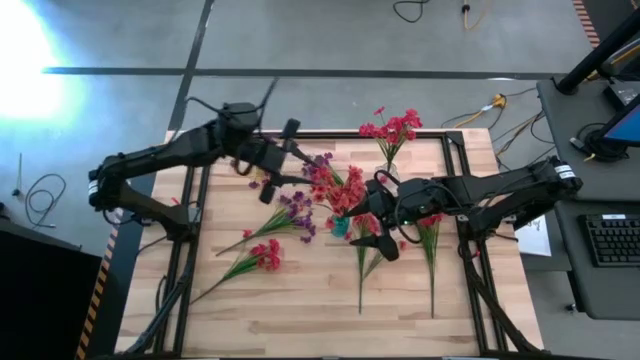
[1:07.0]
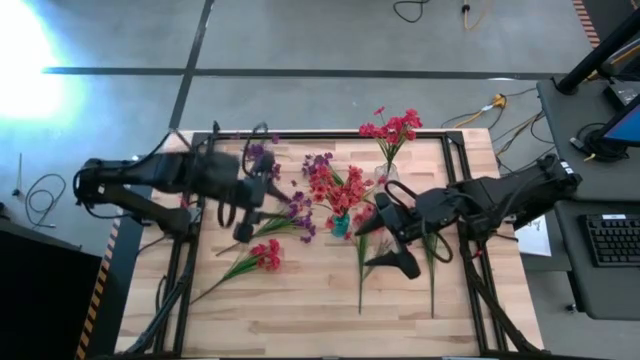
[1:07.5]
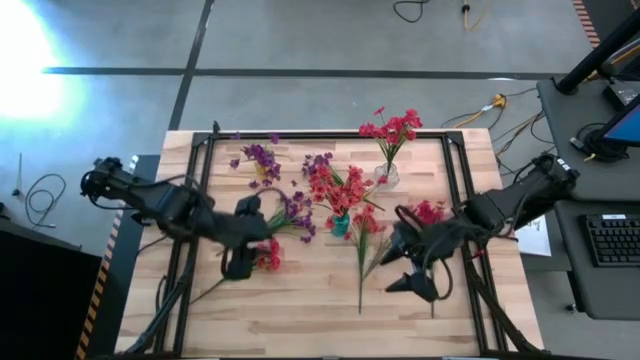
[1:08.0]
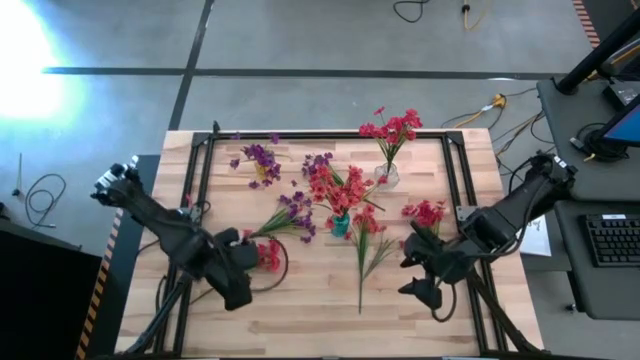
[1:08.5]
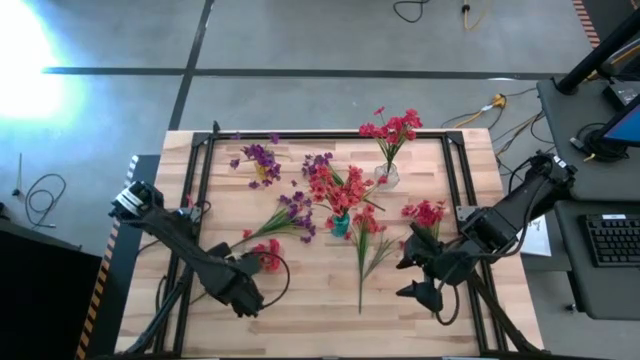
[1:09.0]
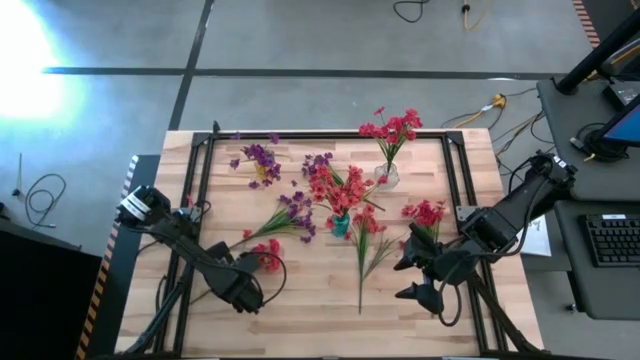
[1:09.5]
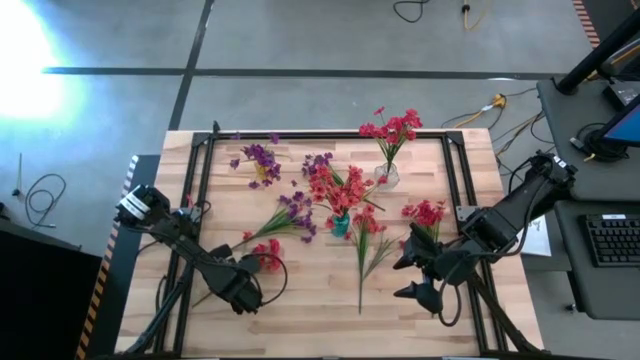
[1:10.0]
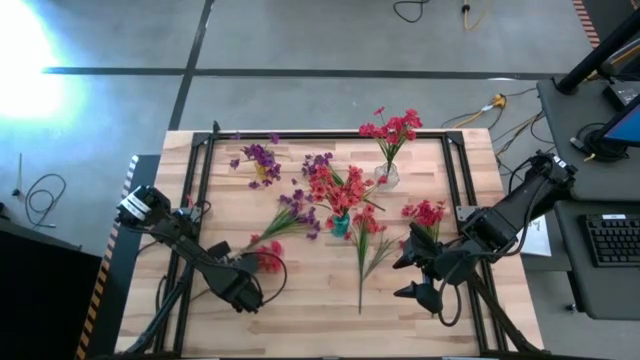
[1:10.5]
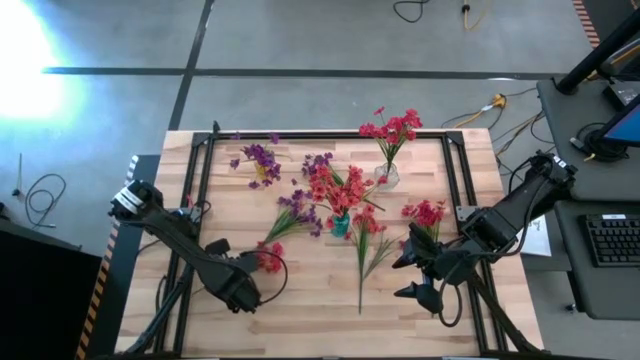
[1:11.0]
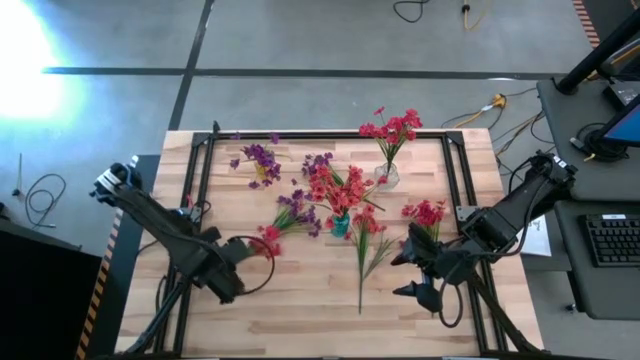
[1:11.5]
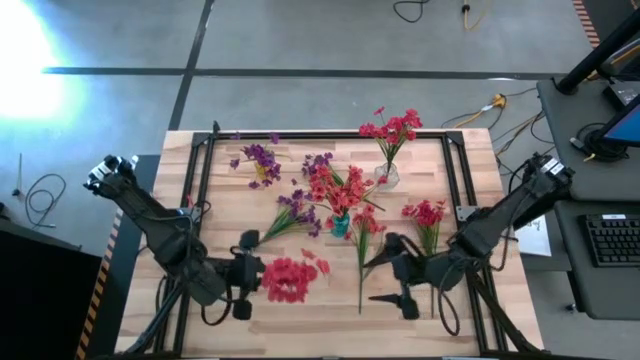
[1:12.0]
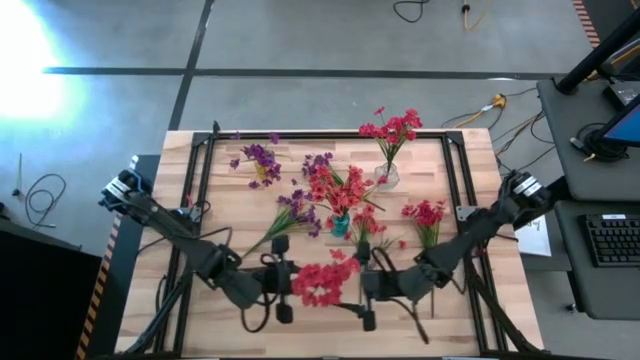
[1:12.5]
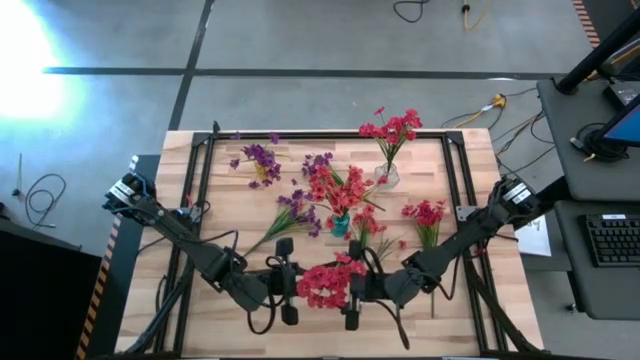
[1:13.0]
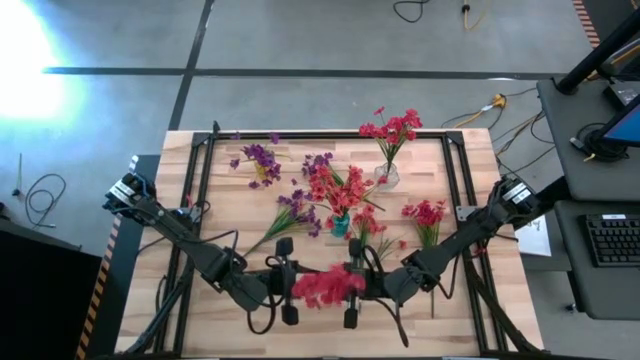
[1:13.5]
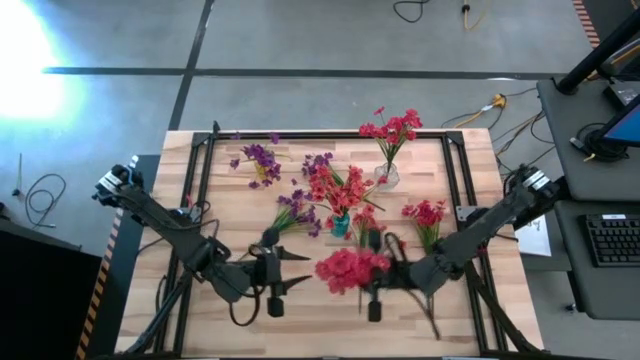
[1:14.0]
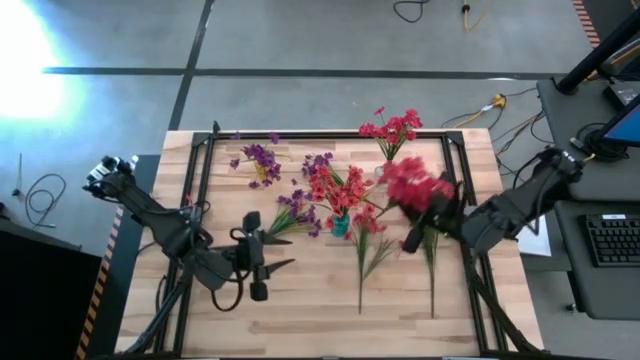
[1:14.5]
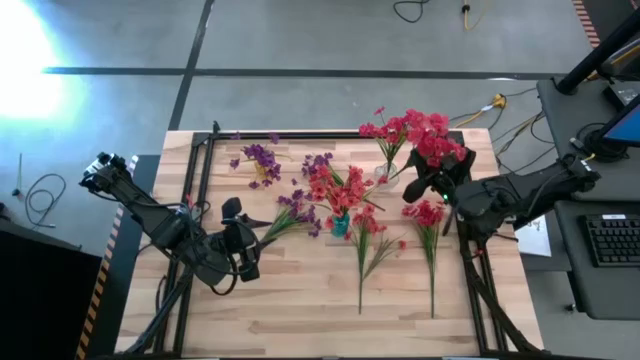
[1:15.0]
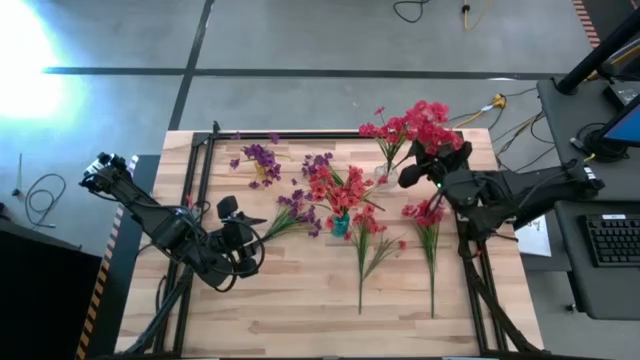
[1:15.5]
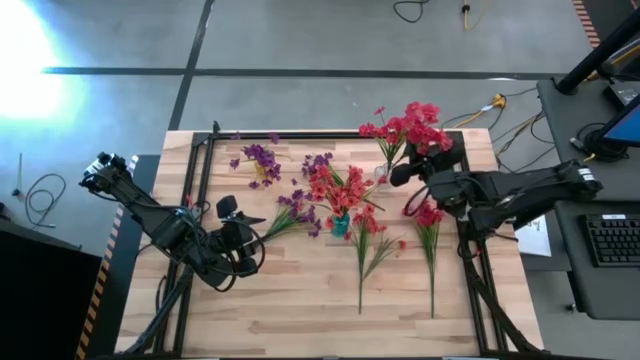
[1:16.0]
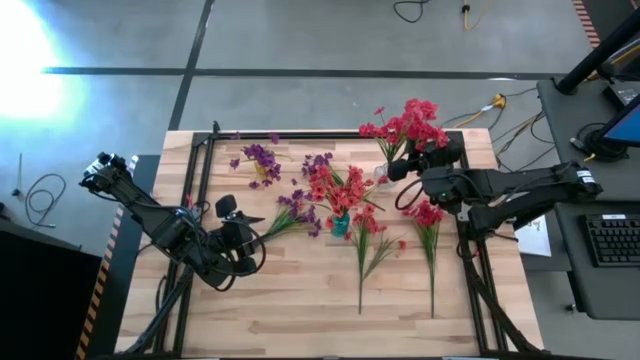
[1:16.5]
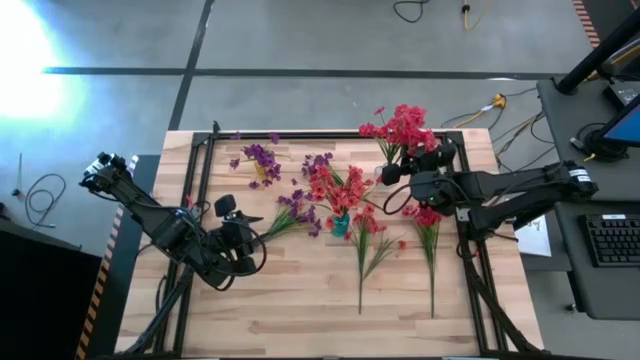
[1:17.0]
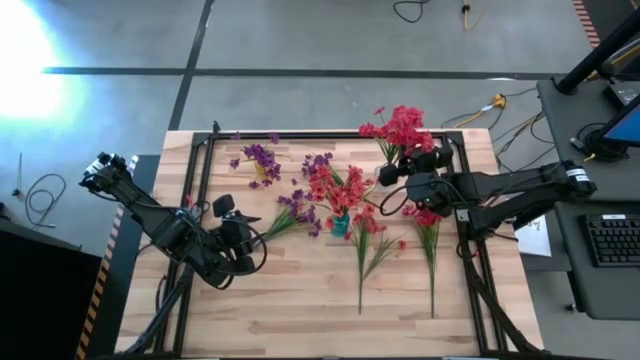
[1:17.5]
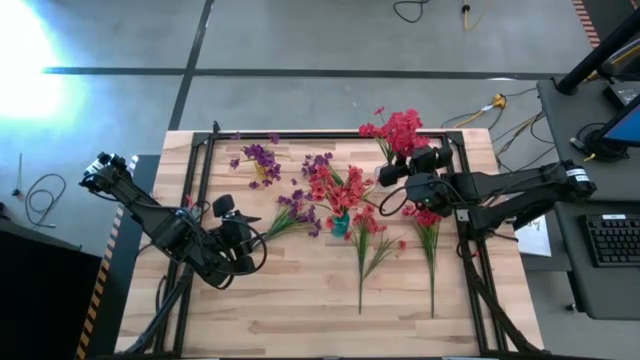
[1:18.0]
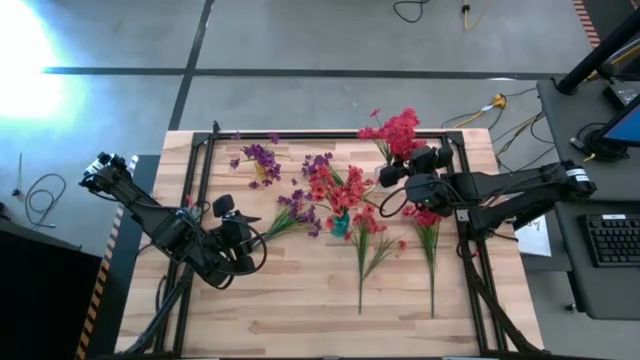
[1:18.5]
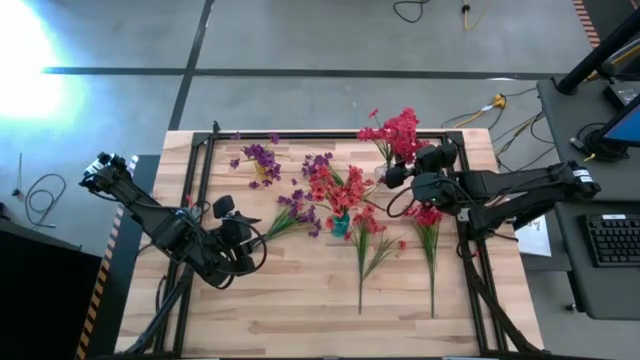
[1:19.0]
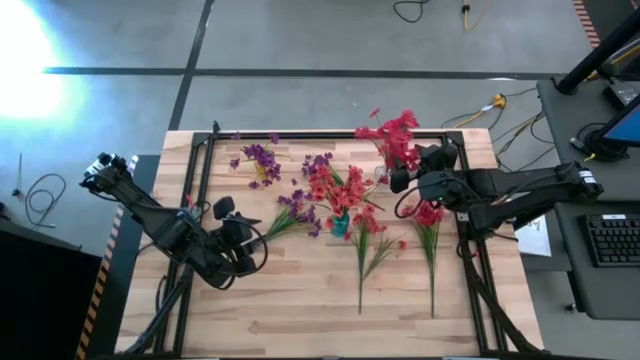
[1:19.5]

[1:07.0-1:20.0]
Task: Sort flowers into vase by color
Put the left red flowers into the transparent vase

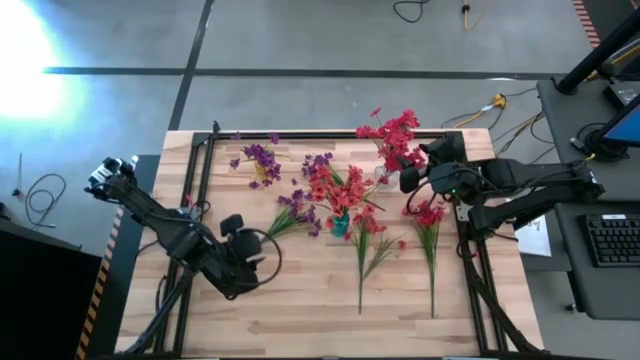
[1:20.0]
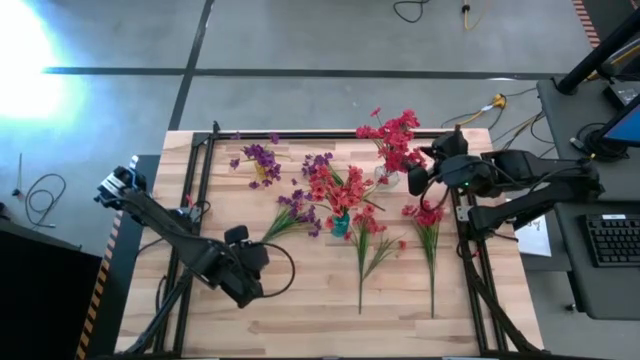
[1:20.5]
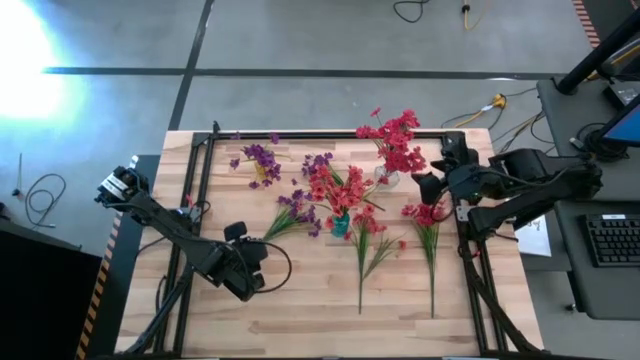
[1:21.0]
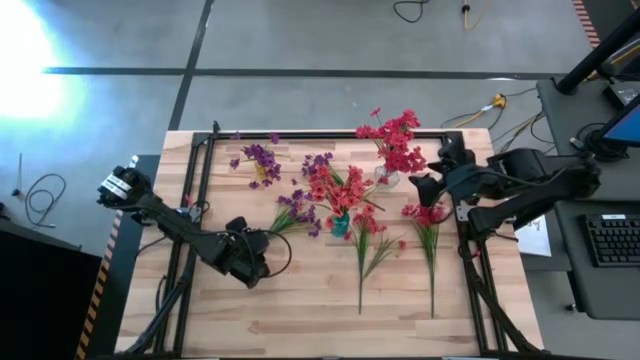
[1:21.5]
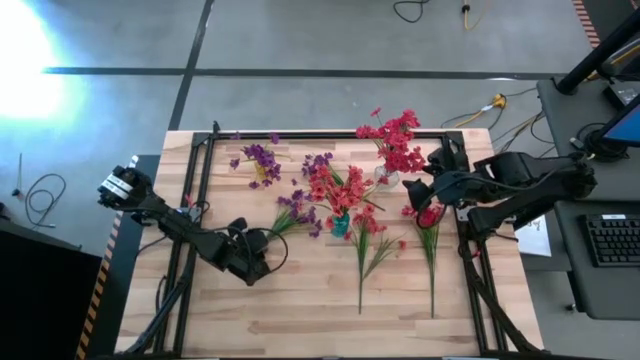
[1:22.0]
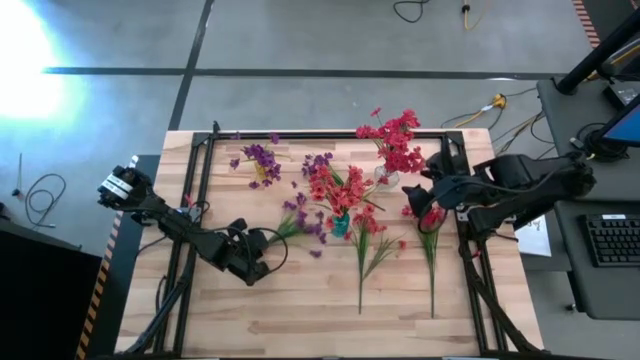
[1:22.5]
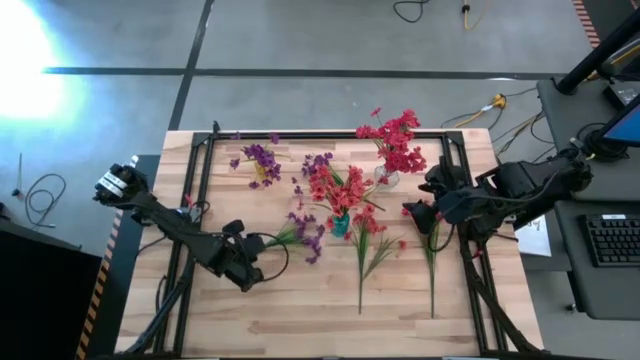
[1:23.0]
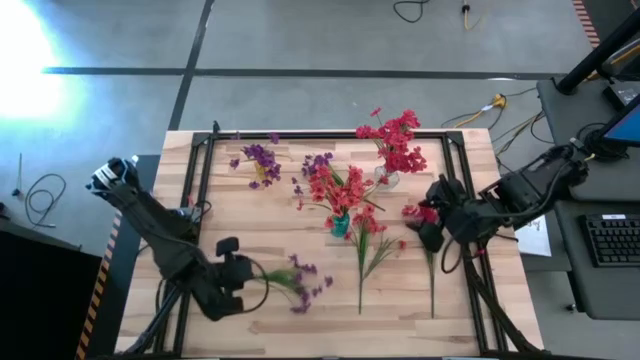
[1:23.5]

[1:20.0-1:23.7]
Put the bottom violet flowers into the yellow vase

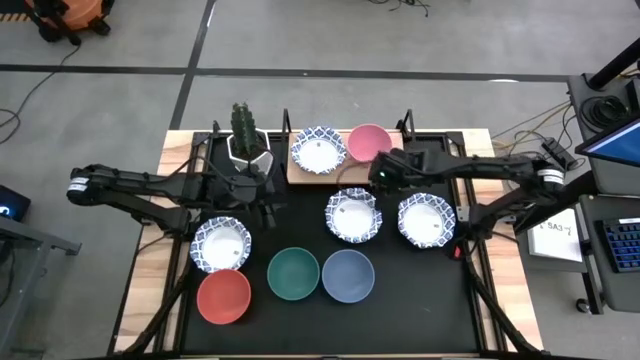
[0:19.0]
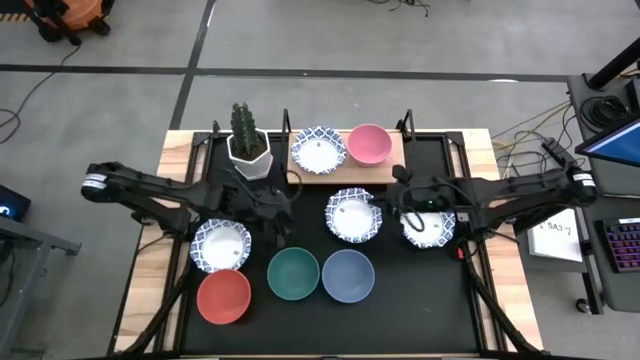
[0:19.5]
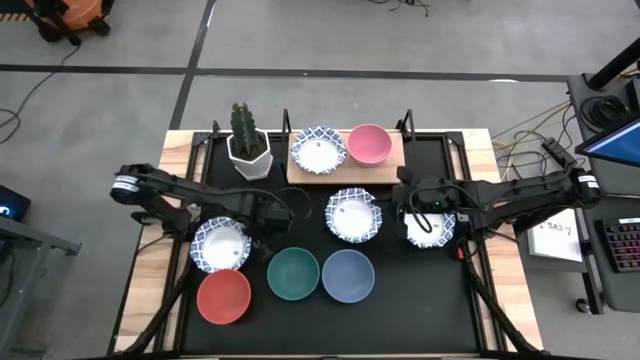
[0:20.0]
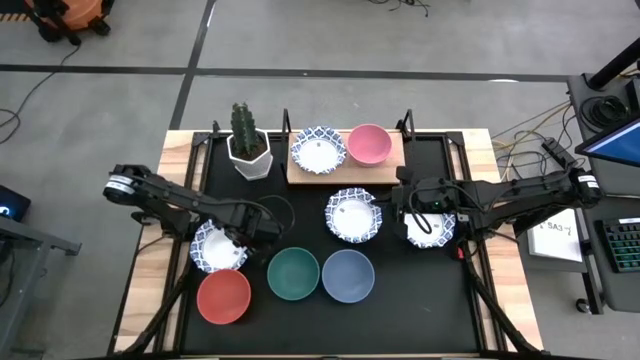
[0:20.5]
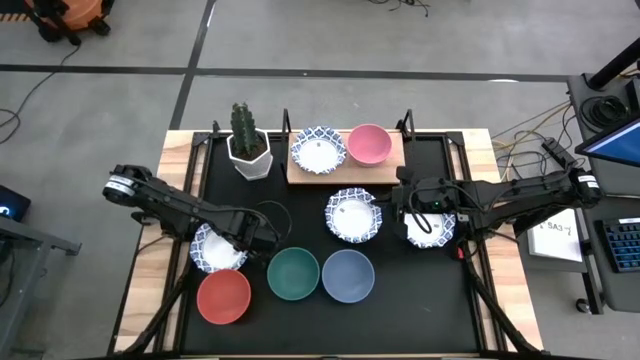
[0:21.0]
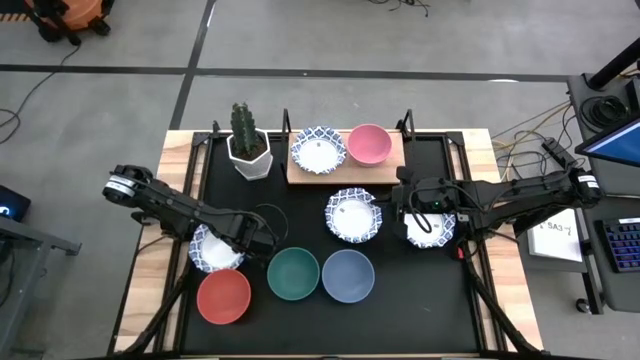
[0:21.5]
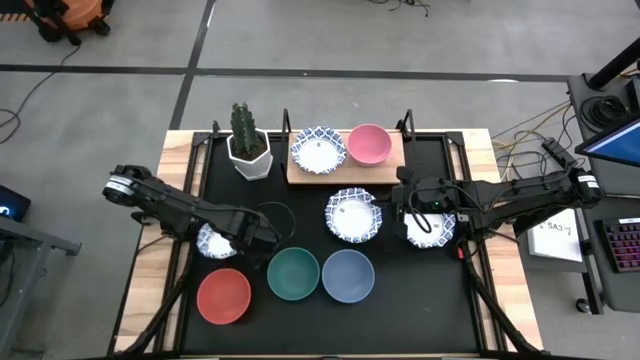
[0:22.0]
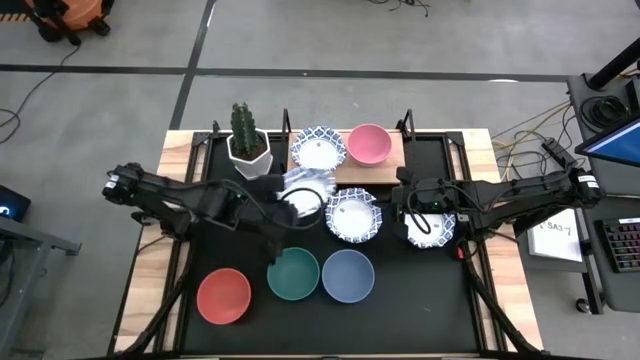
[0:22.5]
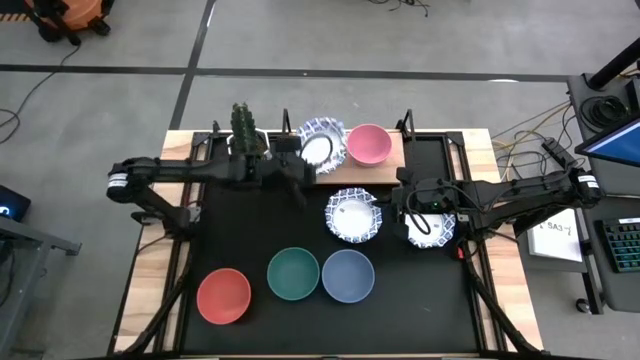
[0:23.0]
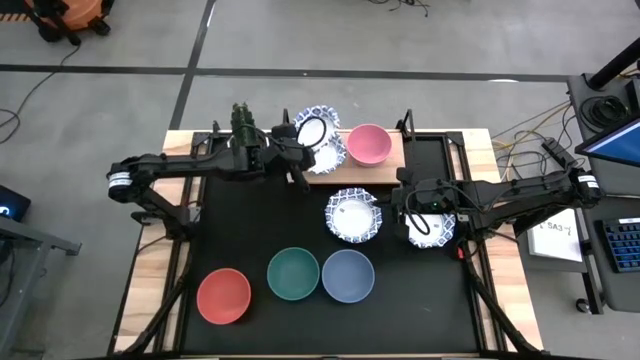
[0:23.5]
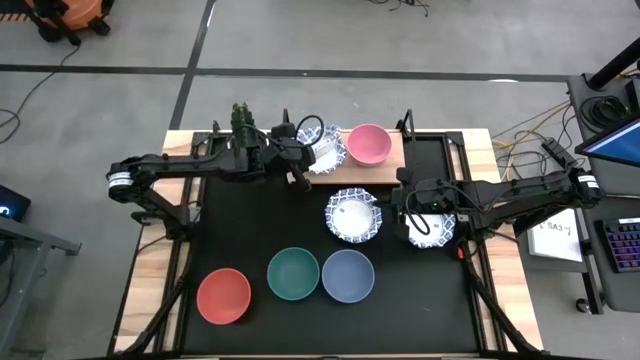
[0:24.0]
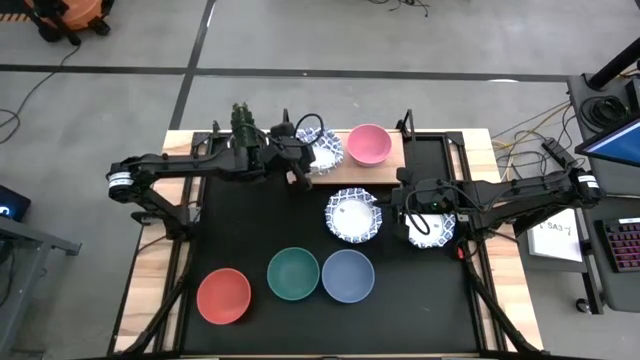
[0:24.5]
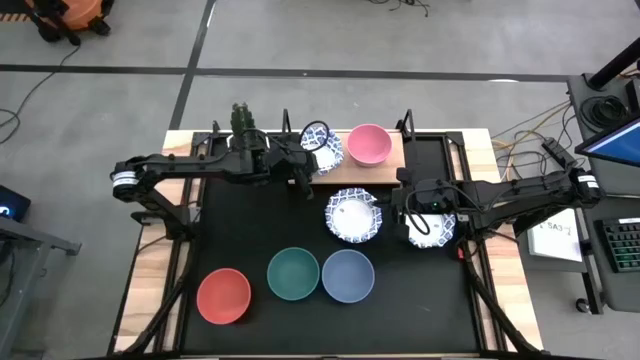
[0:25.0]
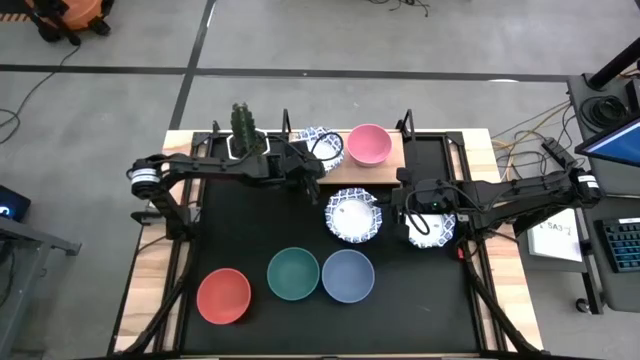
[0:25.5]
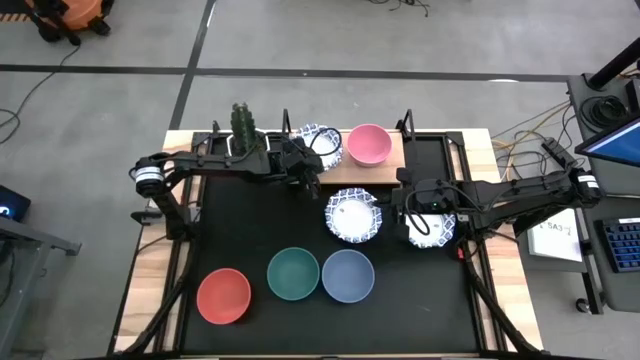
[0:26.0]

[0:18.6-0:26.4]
Task: Place and stack bowls onto a shelf
Stack the white patterned bowl on top of the white patterned bowl on the shelf
